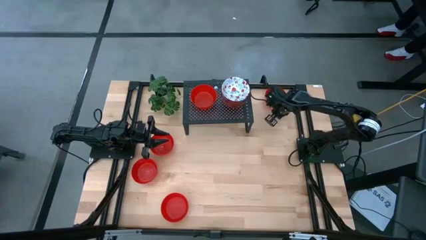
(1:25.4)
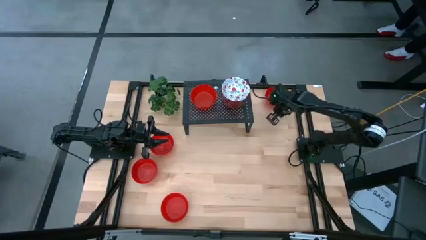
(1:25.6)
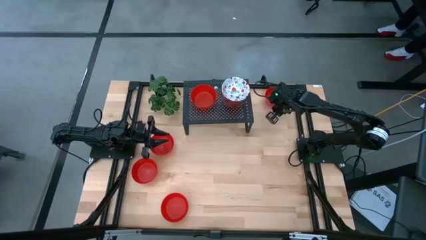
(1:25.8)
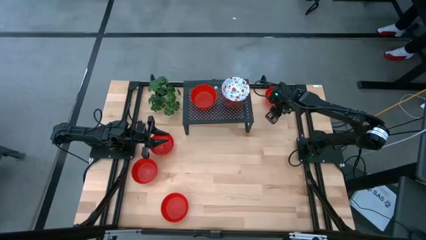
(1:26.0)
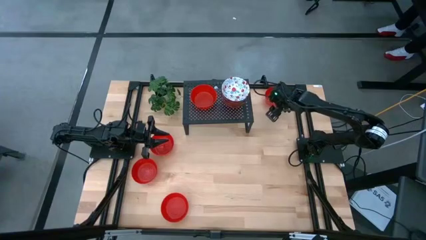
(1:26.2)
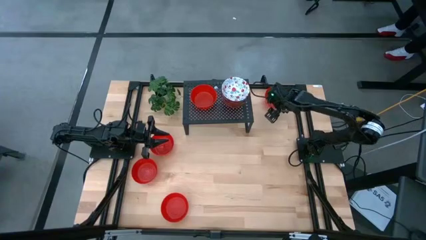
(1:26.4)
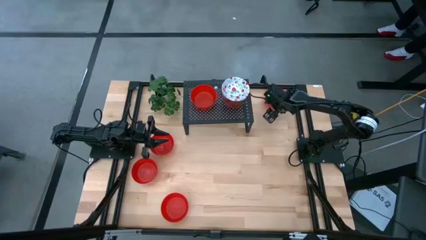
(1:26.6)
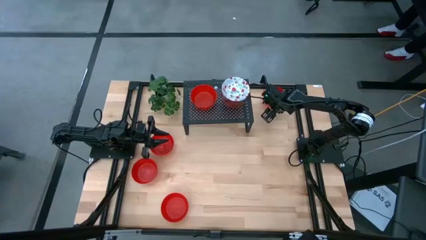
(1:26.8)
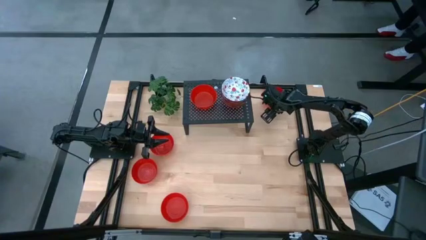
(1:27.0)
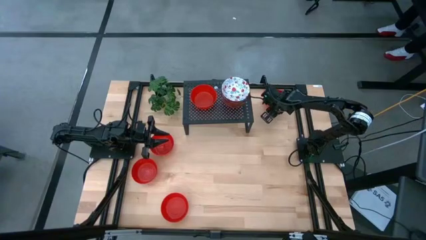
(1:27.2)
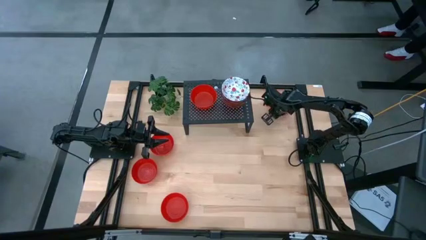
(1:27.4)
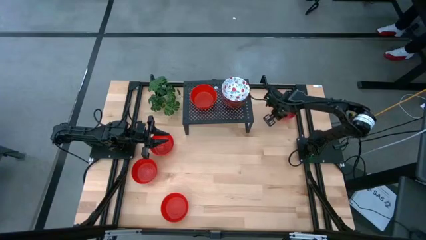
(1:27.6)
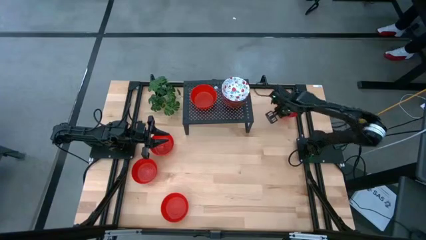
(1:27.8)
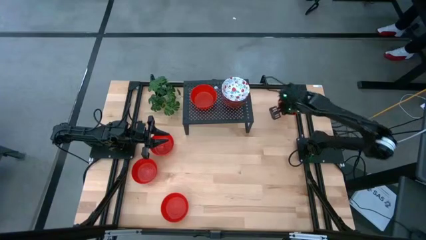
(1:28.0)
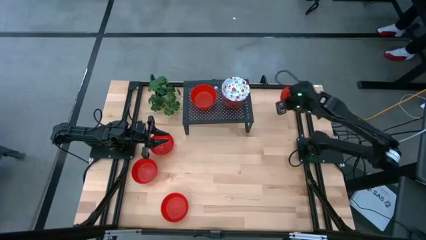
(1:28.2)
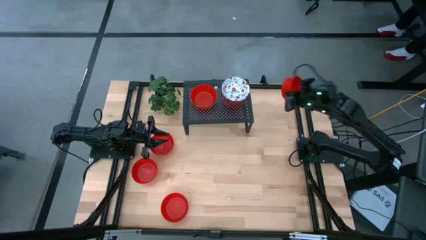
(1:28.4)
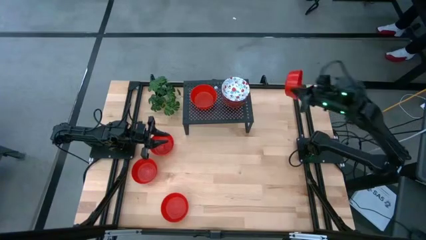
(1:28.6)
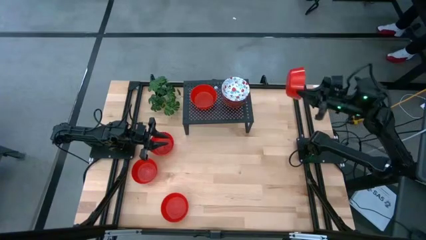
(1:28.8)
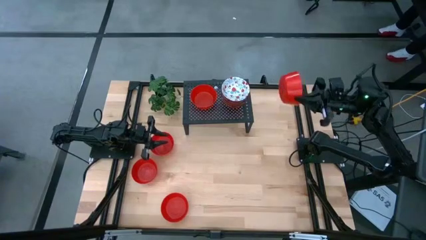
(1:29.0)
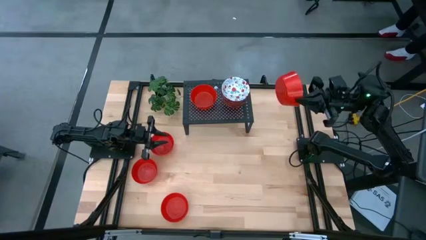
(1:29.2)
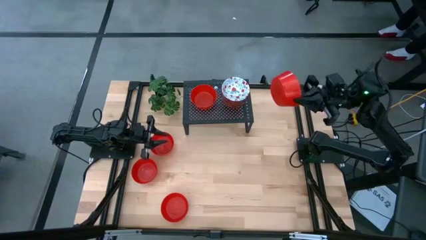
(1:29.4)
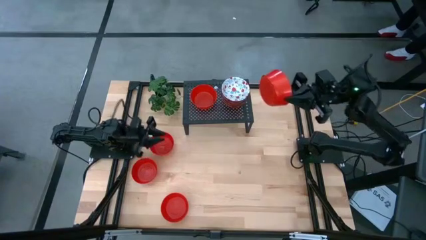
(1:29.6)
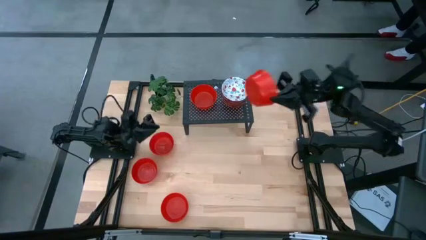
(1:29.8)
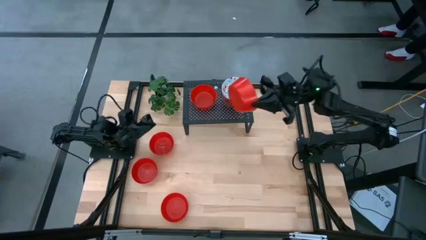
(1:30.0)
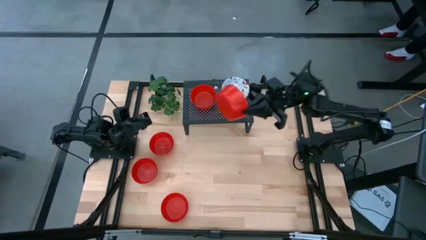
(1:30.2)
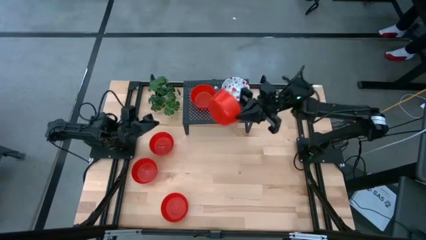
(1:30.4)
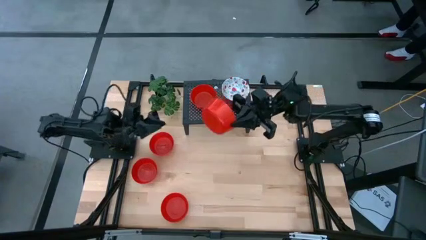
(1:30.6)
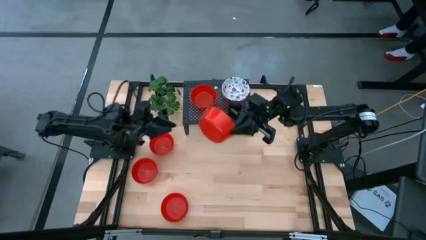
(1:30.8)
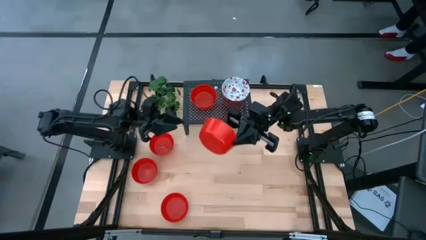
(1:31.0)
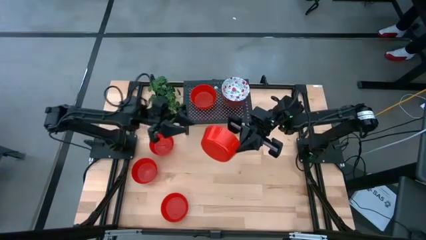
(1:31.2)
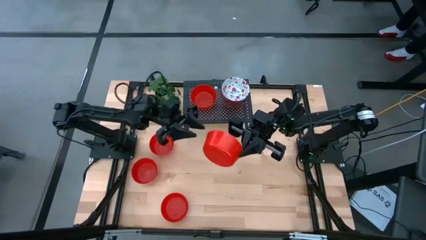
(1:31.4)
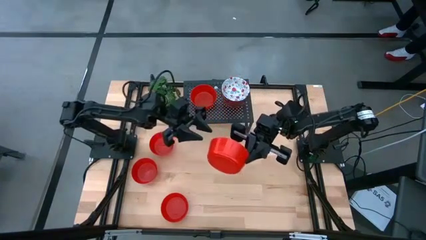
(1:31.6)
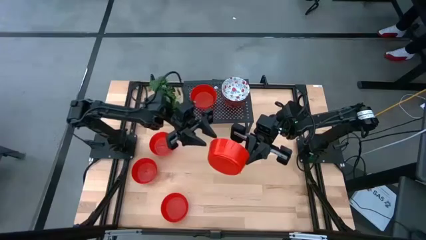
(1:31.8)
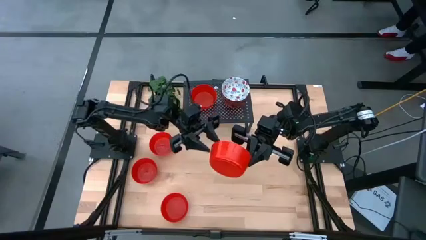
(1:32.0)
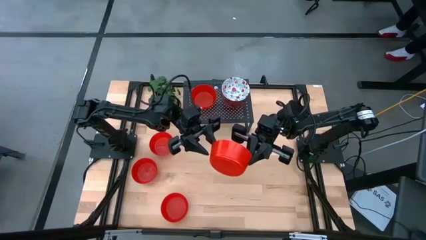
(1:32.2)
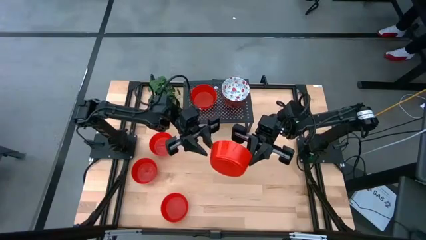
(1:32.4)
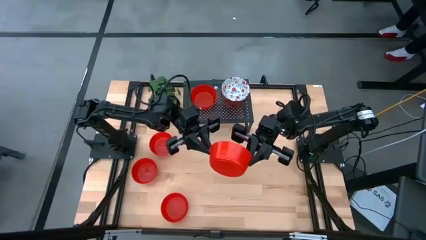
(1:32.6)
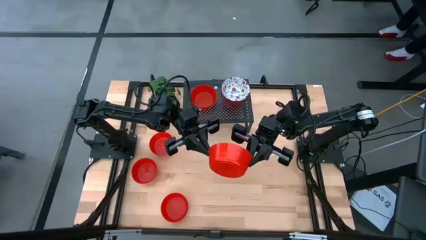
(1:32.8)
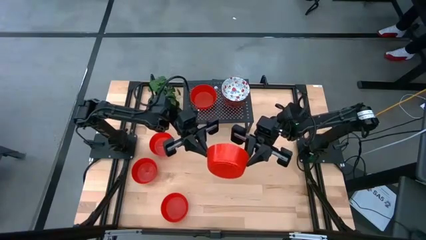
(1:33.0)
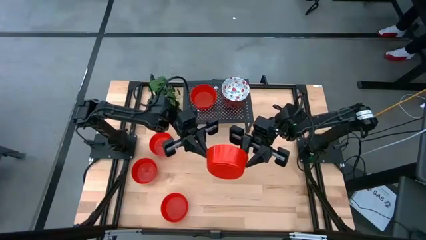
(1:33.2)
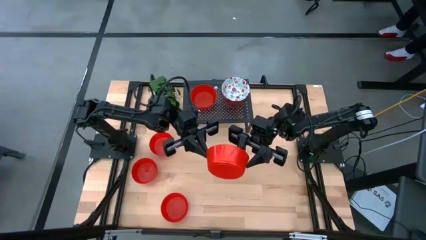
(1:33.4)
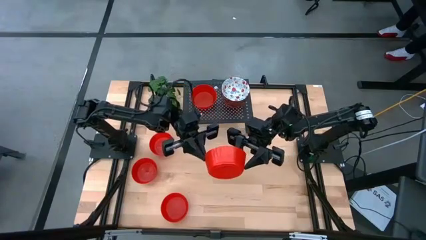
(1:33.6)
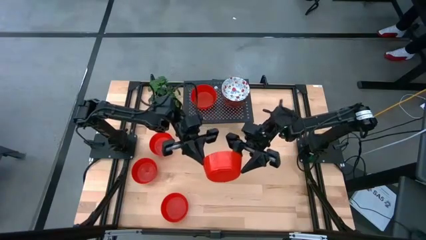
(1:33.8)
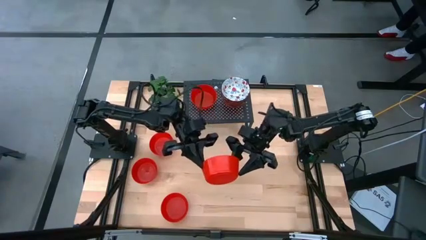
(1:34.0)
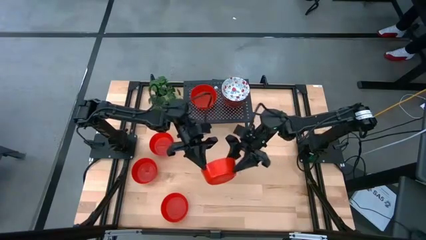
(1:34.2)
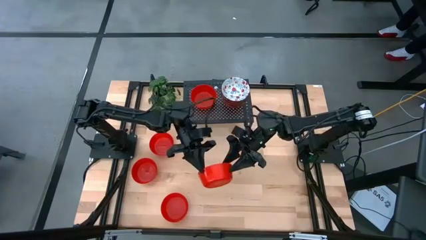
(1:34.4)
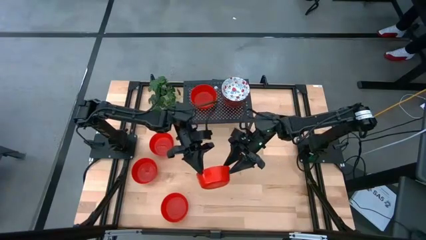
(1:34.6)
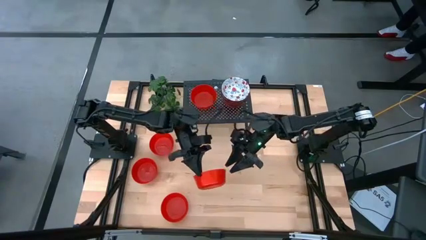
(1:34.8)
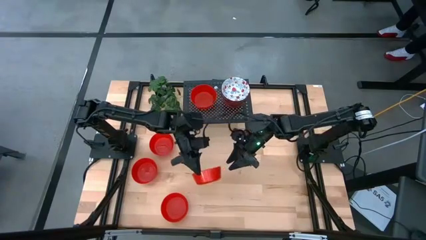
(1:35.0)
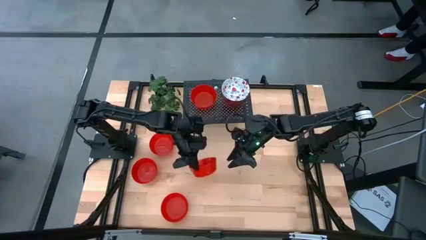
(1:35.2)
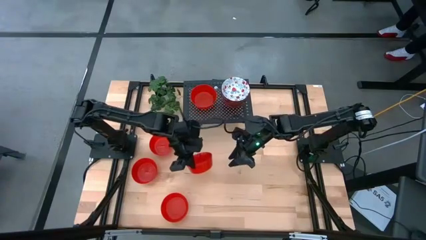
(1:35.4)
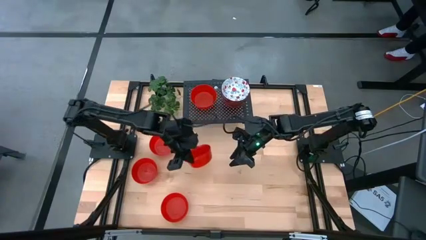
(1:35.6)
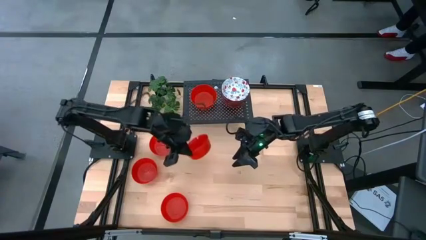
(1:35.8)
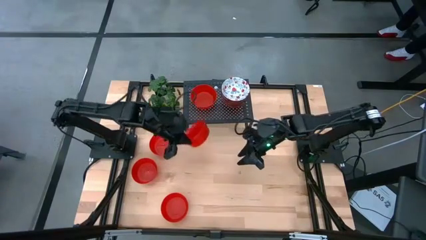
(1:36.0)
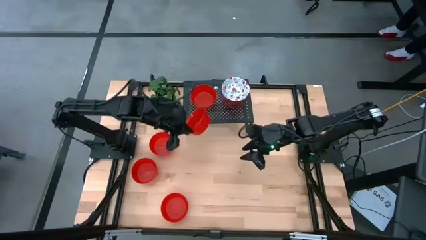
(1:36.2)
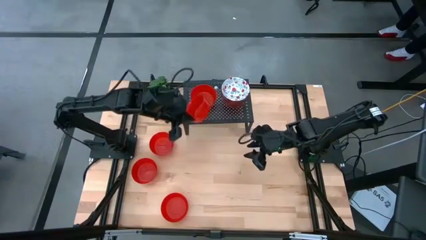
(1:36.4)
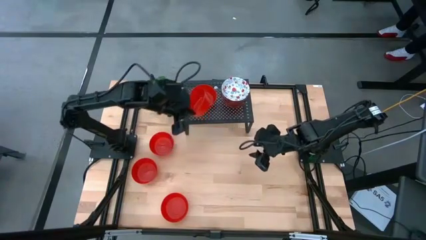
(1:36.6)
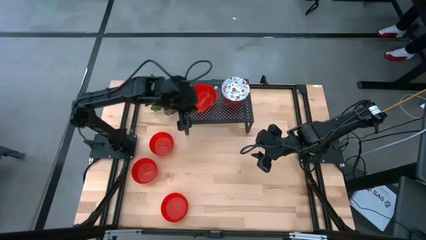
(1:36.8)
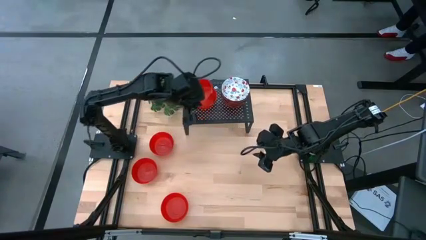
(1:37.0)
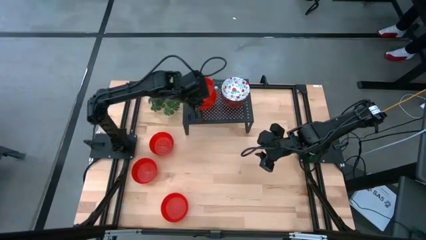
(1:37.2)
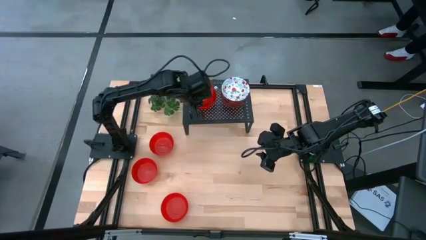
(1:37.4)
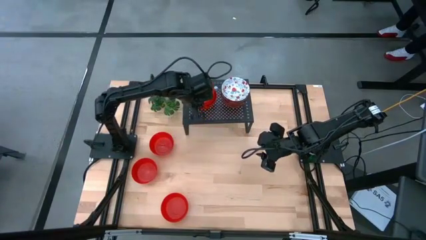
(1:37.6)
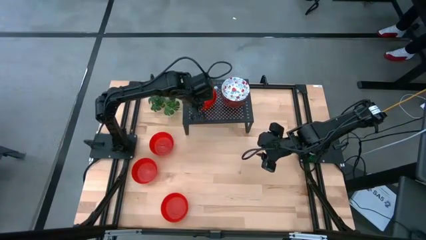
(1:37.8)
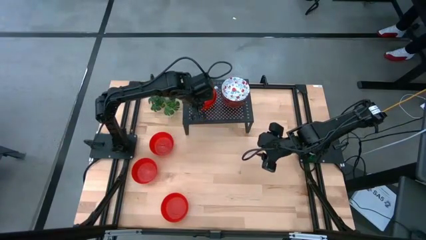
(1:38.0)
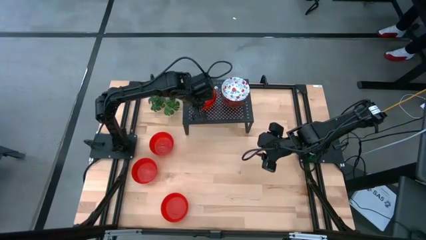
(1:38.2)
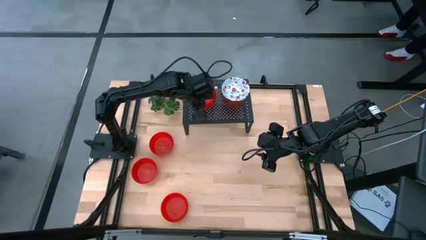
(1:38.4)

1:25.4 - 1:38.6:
Task: Pick & Place Mini bowls
Stack the red bowl on the top of the red bowl on the shelf
